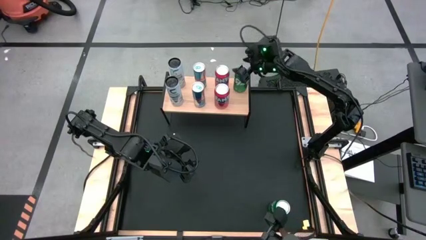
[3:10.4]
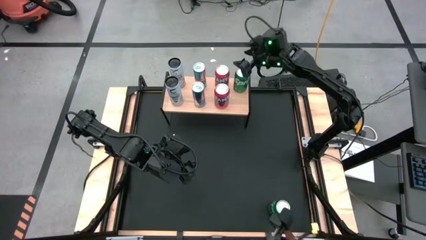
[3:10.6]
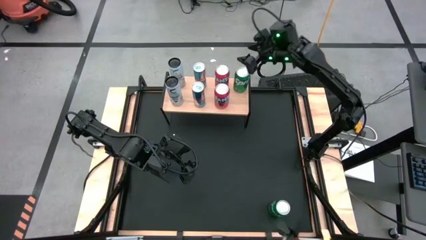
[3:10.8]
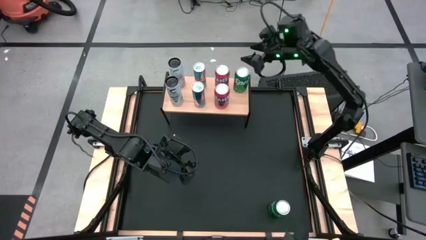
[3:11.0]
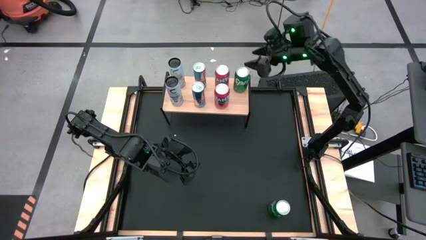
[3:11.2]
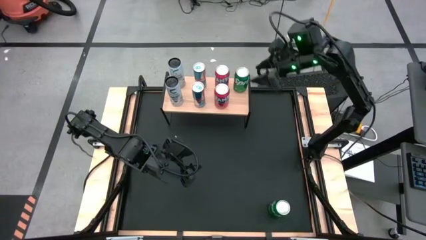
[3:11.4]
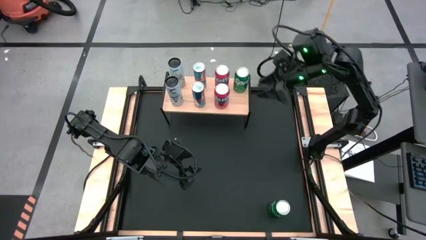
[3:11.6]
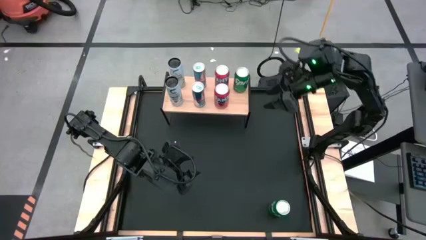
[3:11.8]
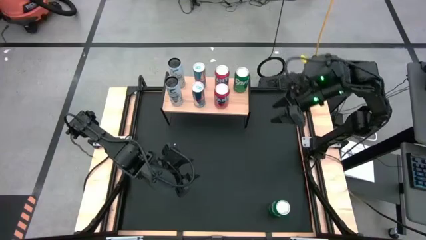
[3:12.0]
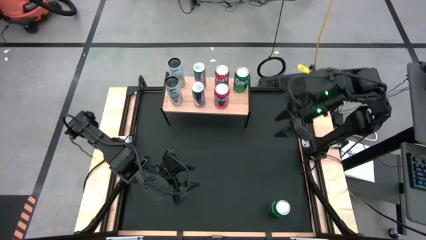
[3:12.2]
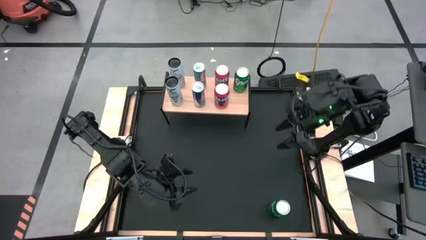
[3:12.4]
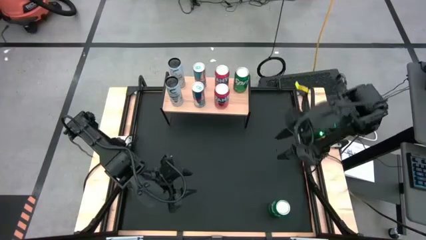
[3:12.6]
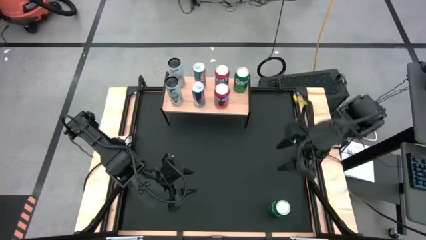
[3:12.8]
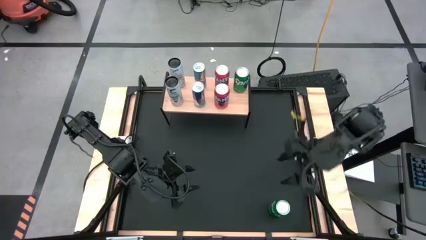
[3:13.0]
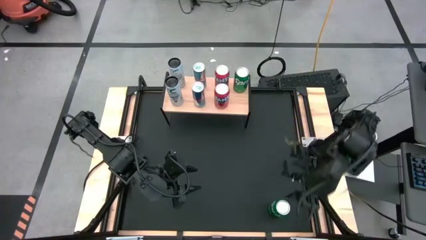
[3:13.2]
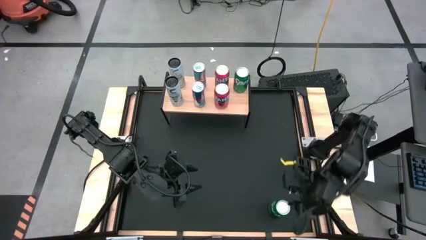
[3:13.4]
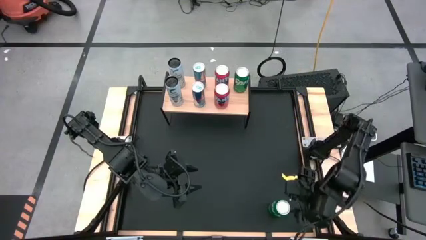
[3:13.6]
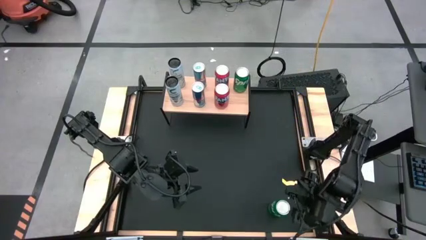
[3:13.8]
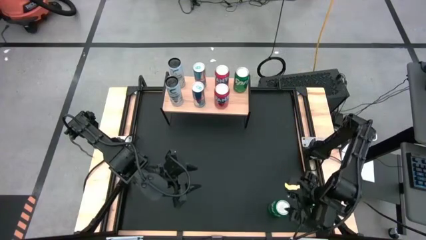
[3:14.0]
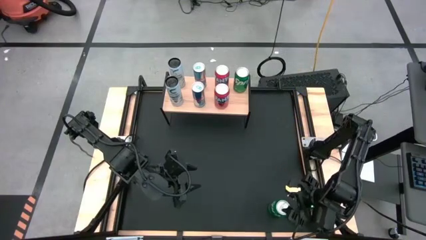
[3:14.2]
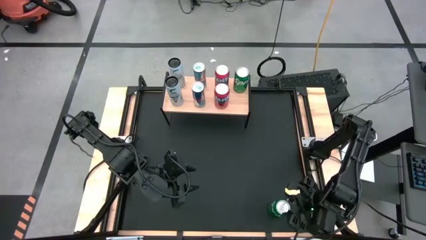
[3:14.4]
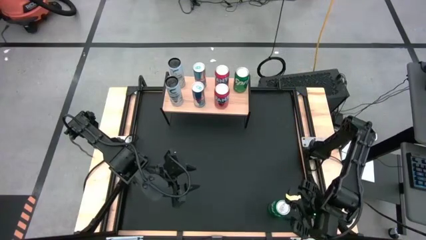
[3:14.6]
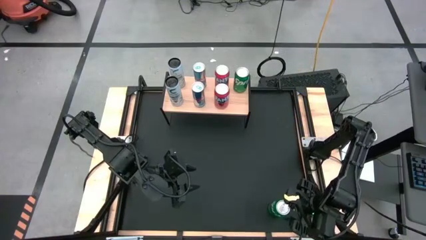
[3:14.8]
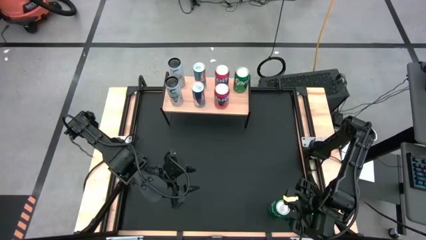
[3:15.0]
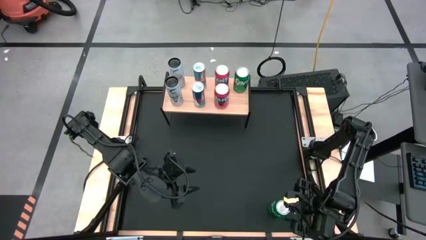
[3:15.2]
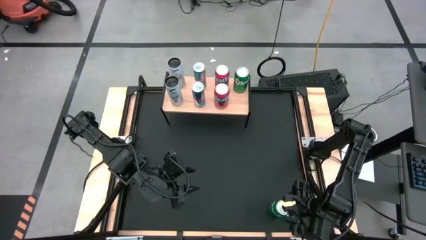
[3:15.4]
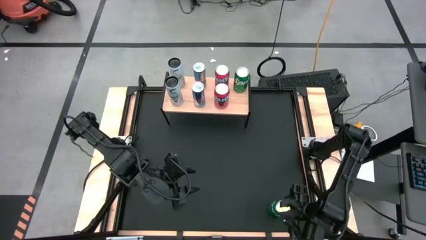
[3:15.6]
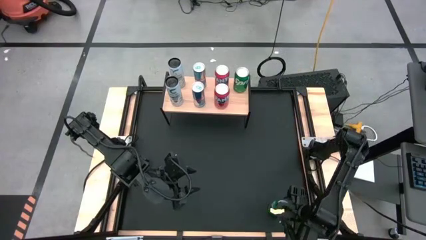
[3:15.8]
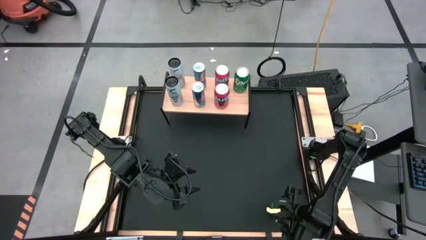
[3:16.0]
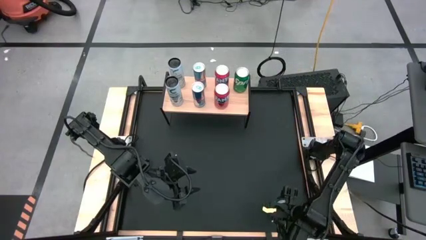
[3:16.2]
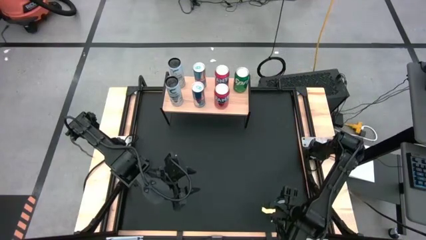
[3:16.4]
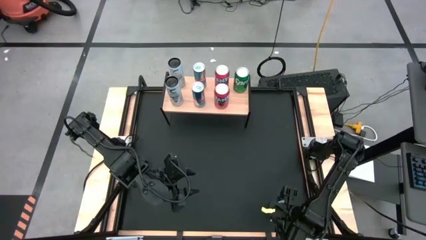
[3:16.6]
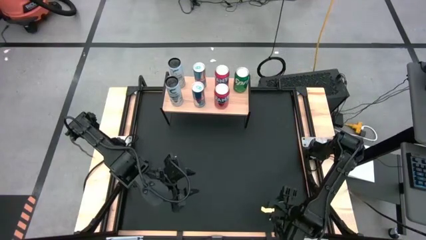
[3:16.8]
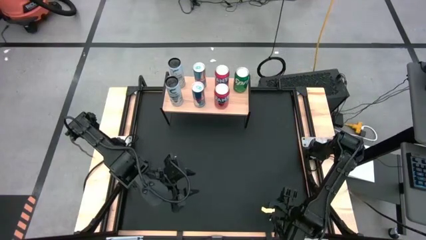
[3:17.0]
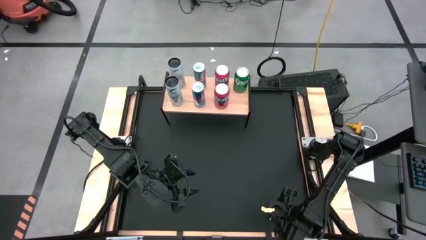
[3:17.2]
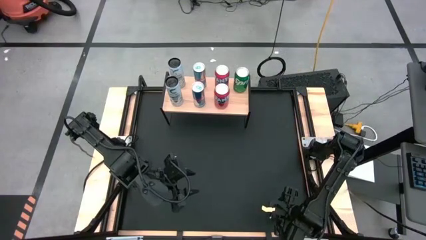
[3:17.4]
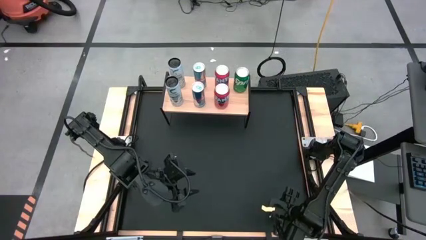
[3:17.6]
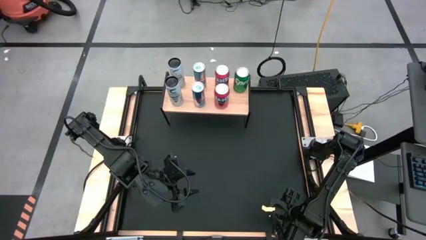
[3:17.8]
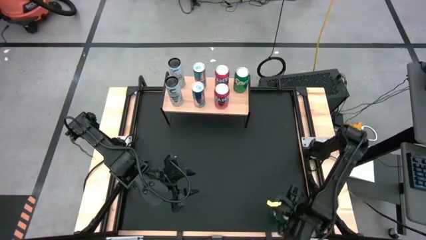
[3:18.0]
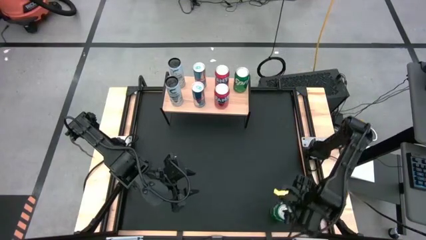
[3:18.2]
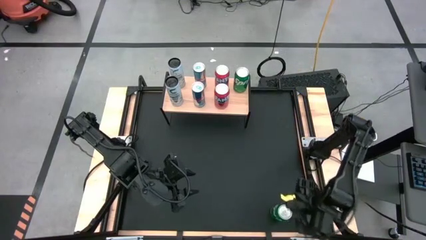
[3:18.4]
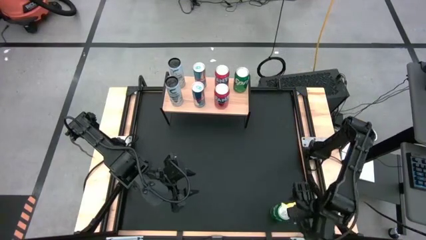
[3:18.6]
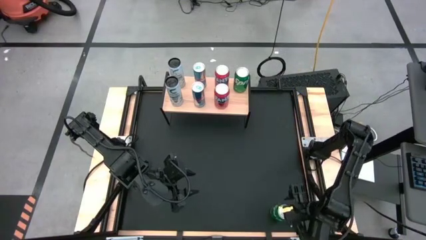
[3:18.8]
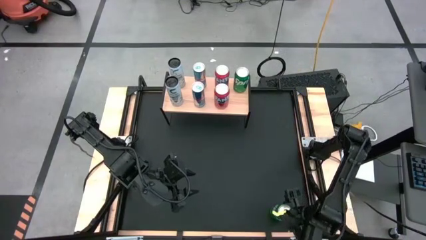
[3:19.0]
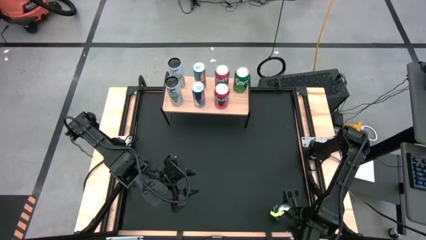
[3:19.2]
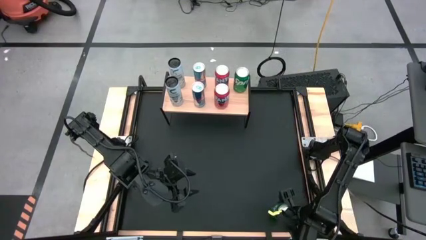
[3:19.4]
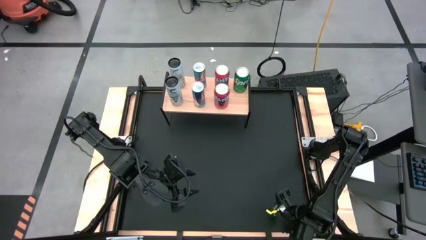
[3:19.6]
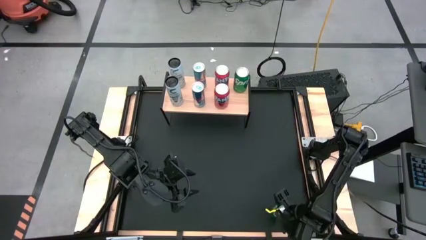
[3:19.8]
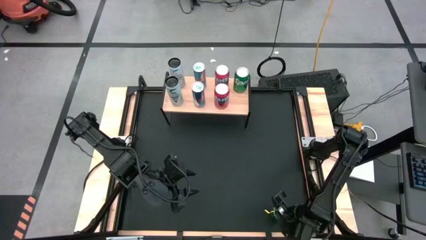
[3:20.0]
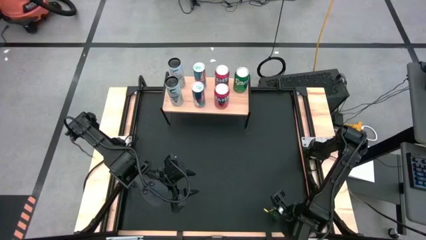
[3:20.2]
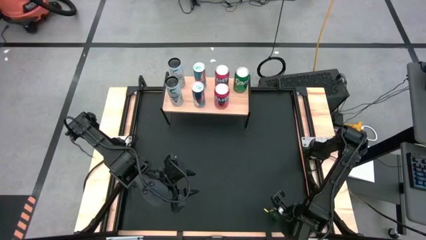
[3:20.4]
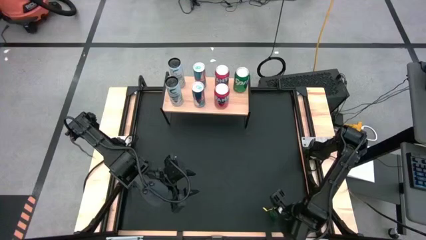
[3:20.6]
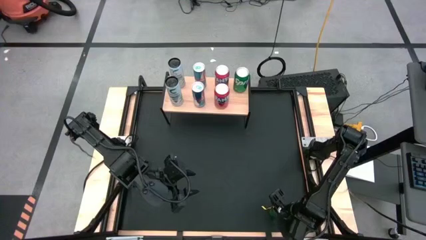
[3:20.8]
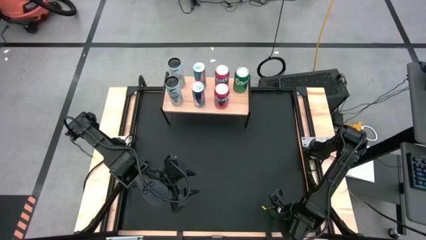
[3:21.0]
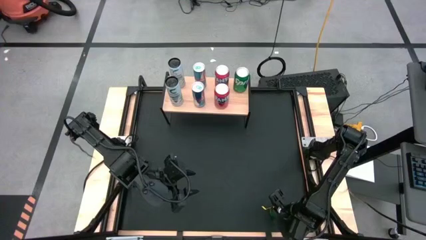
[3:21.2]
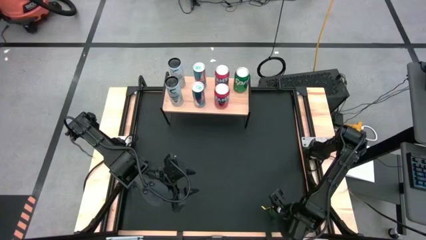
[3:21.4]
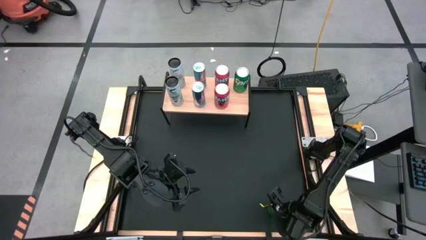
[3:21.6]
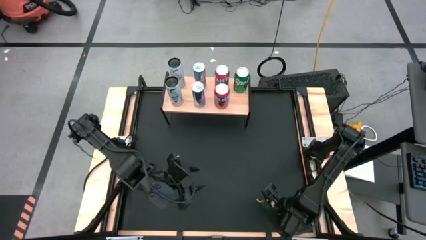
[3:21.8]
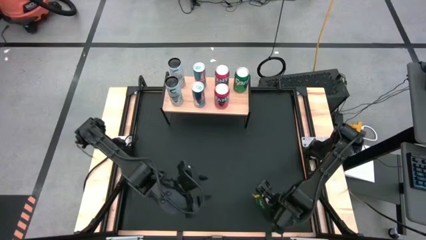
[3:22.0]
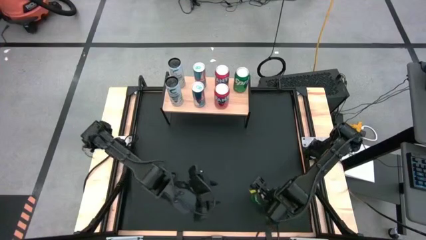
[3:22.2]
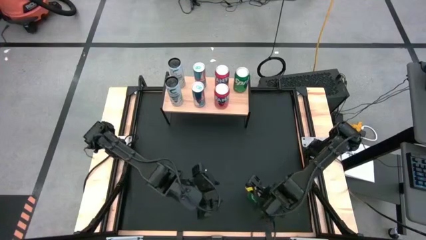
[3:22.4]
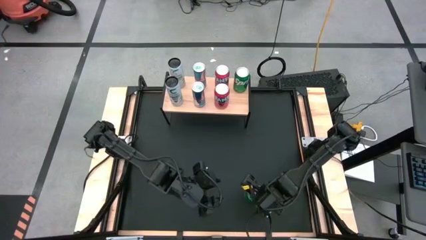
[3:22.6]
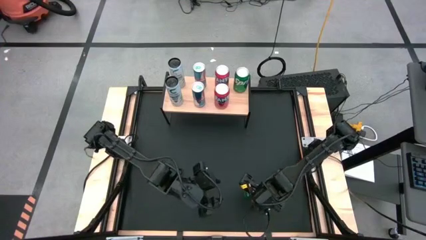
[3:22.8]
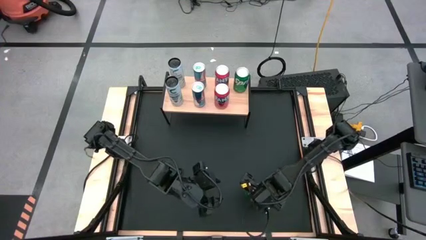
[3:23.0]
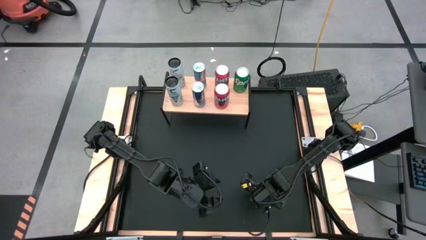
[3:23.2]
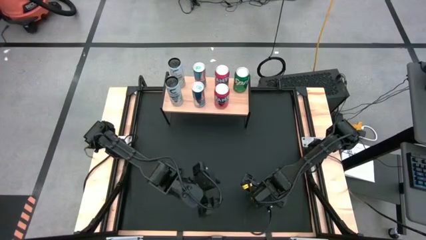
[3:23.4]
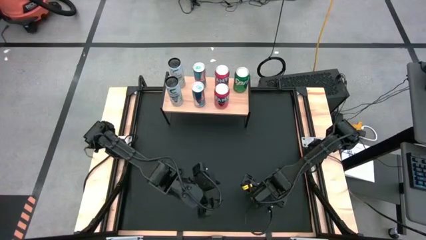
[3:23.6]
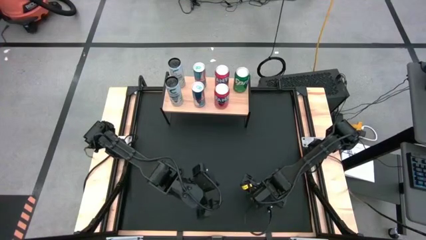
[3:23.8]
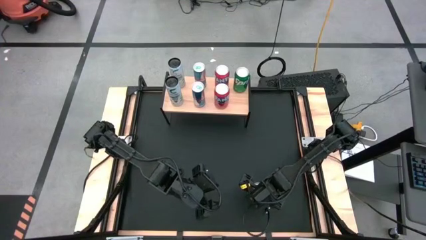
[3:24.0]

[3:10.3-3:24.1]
Task: Place canned beverage on shelf
Put the green soda can, aligned with the other green soda can on the shelf

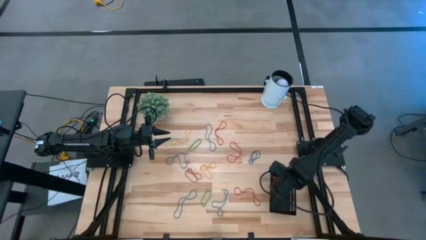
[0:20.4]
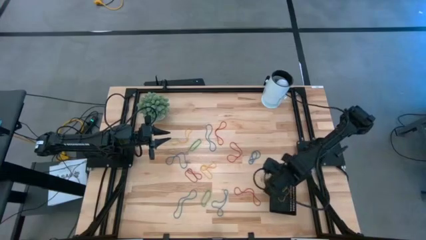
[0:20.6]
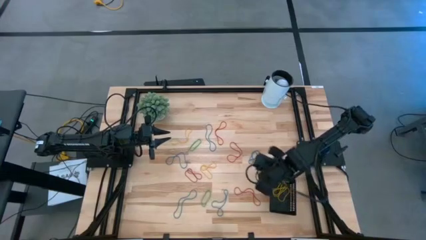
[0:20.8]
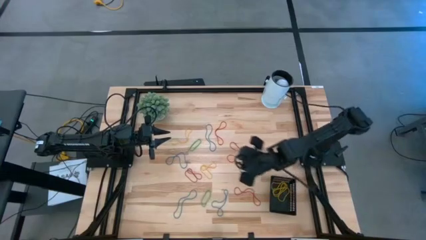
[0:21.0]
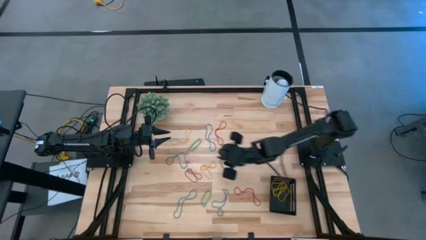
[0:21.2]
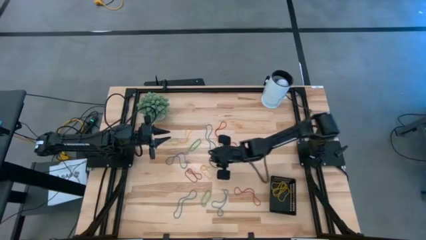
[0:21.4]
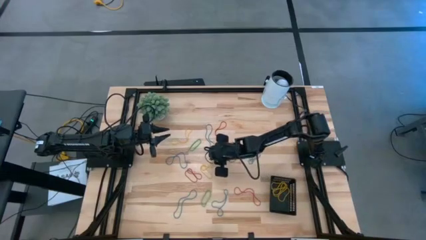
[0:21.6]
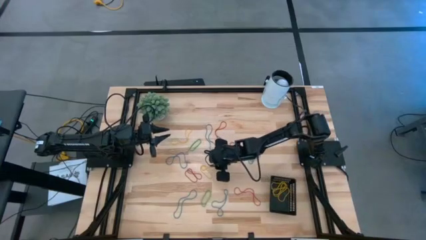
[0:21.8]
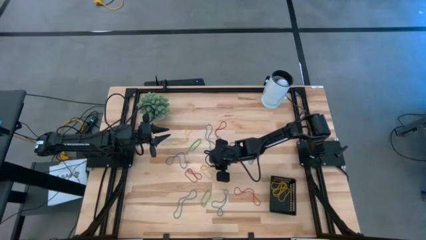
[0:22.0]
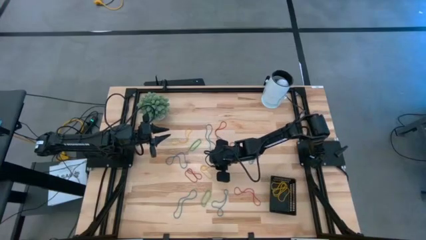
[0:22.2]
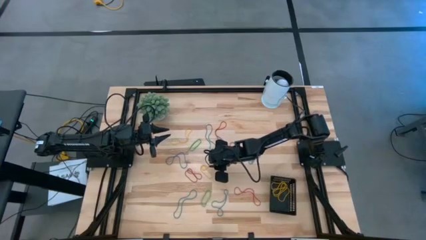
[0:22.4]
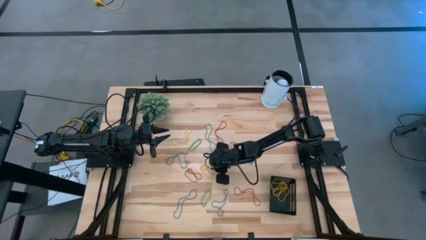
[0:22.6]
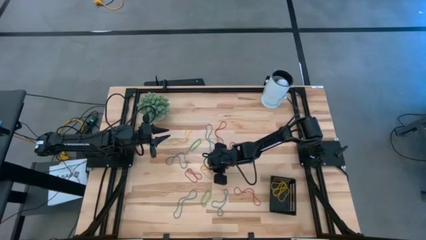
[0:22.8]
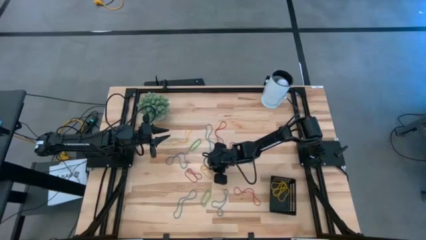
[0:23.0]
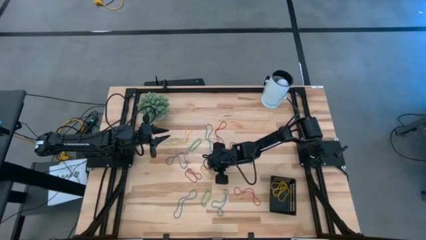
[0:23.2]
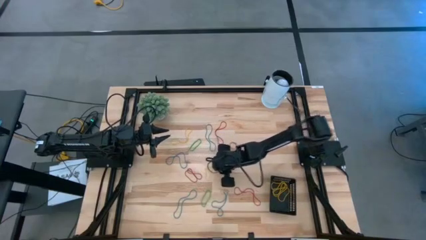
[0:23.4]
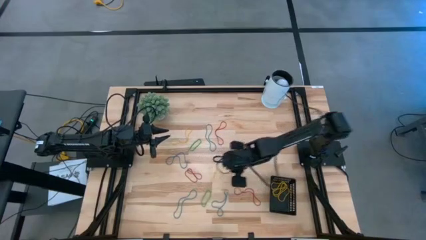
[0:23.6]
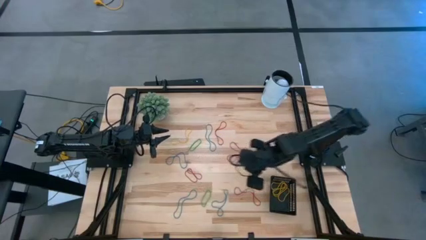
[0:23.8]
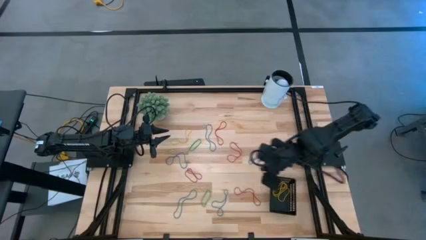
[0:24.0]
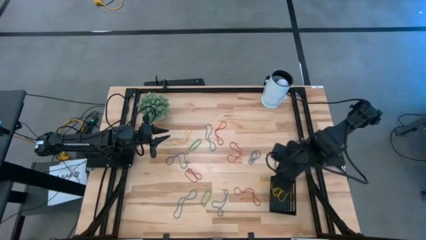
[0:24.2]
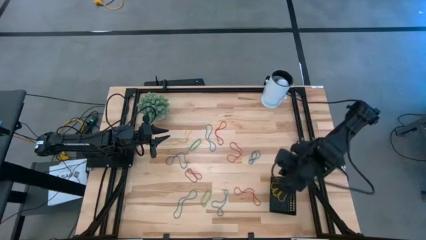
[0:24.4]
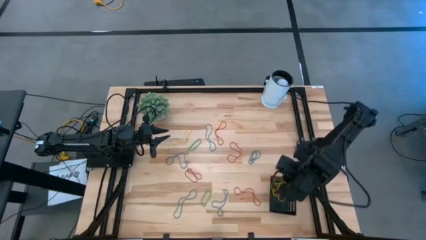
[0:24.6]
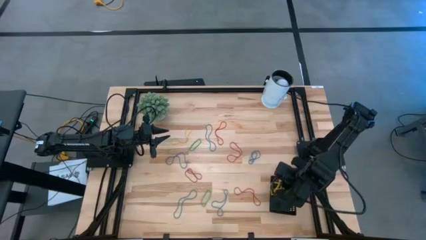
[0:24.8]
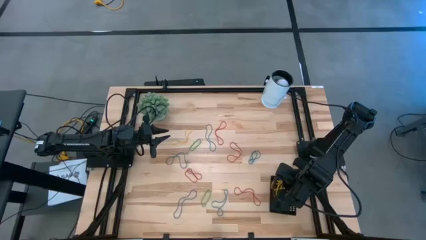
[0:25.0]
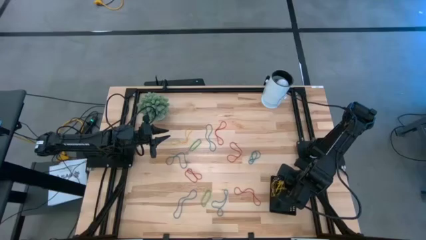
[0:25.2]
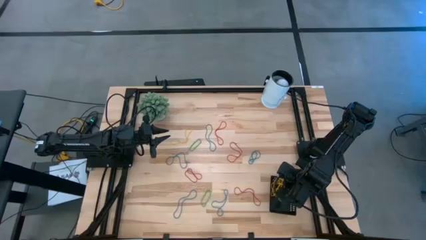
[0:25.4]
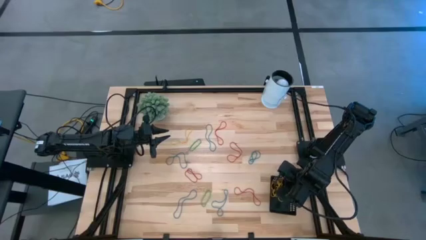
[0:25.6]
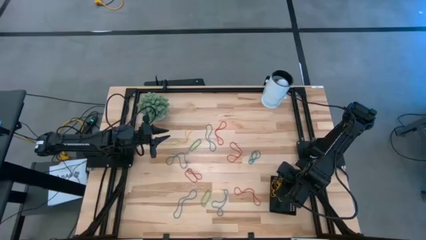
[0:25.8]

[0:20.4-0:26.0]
Task: Pick and place items into bin
Put the bottom yellow rubberband into the black basket
